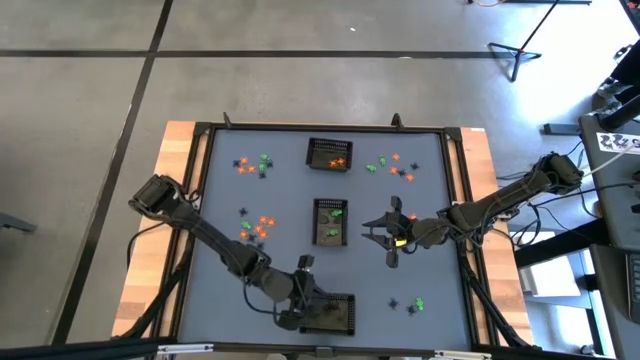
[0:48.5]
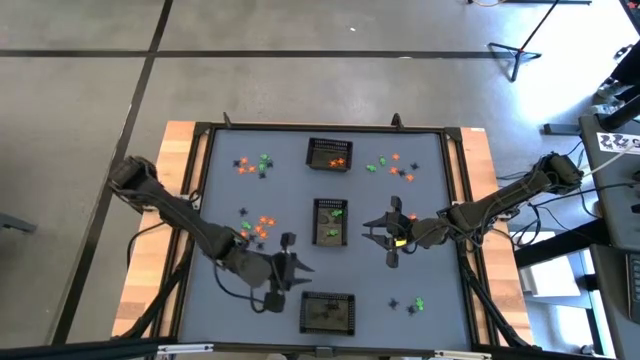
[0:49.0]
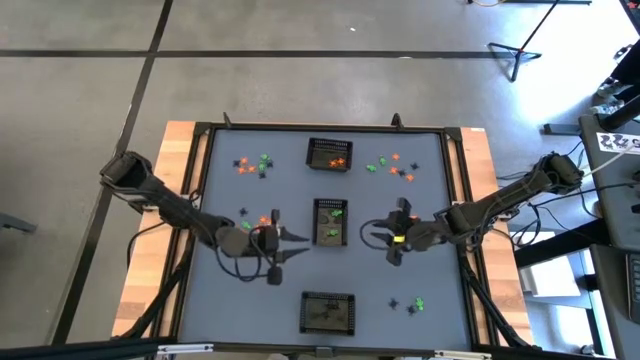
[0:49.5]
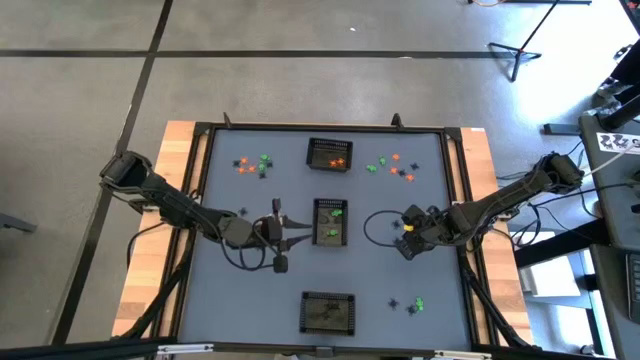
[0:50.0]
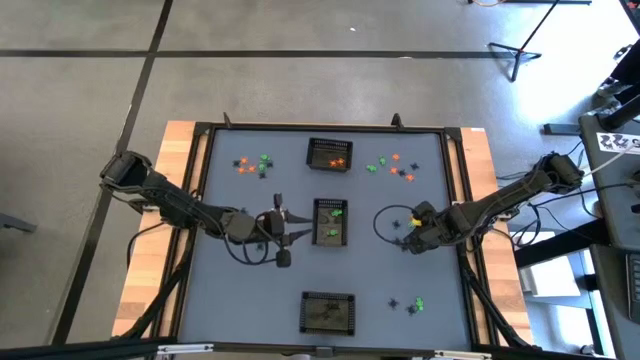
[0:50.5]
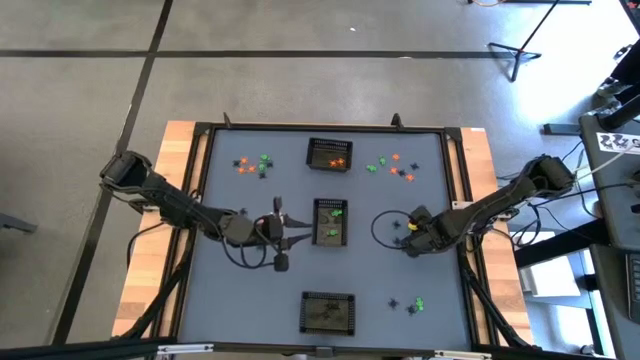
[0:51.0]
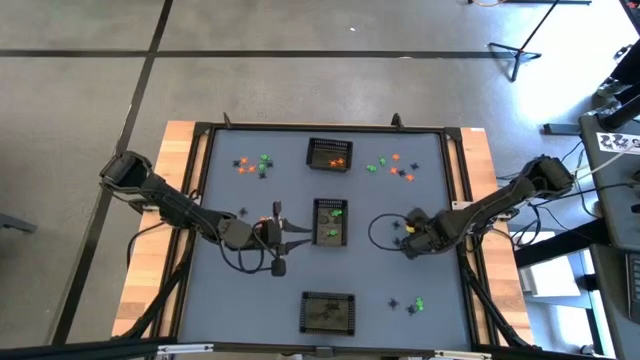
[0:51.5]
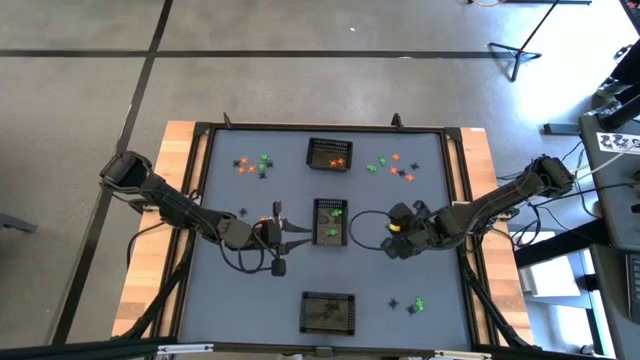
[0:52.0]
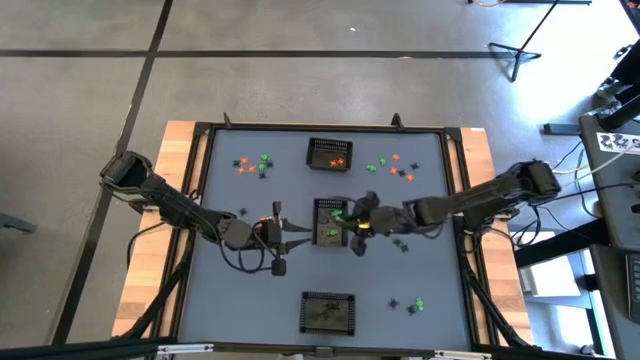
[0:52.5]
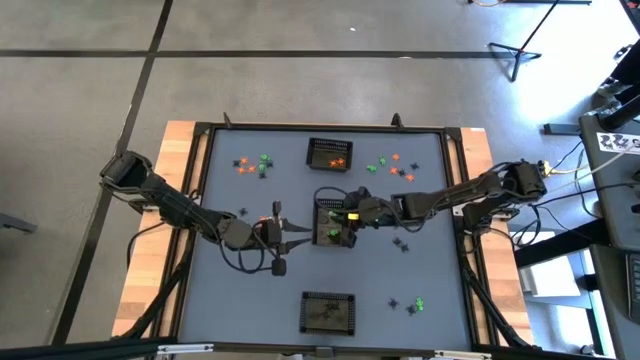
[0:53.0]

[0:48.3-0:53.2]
Task: Sort Halloween decoration
Put the green skeleton toy into the center black bin

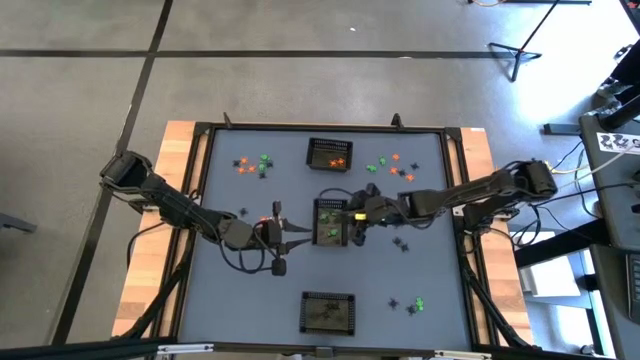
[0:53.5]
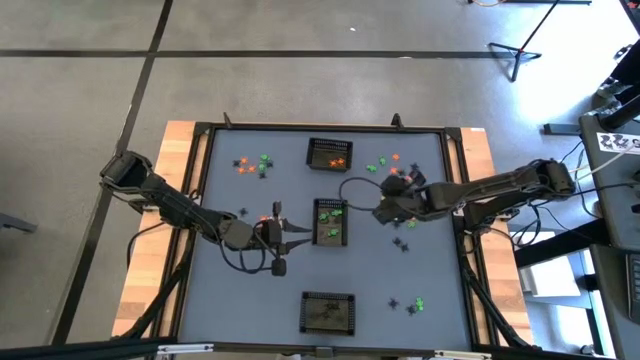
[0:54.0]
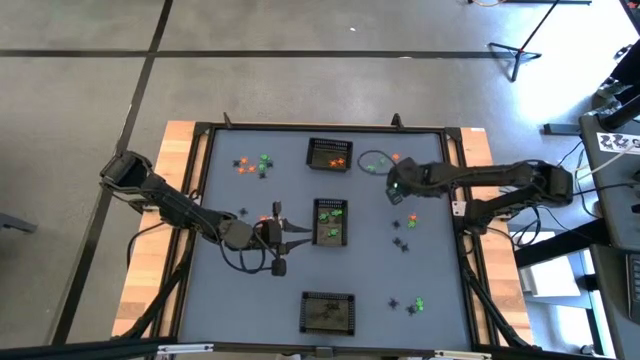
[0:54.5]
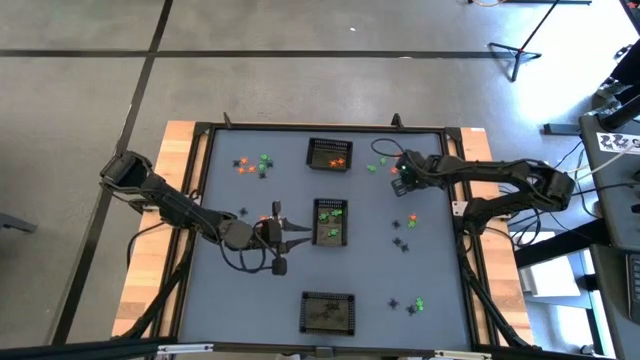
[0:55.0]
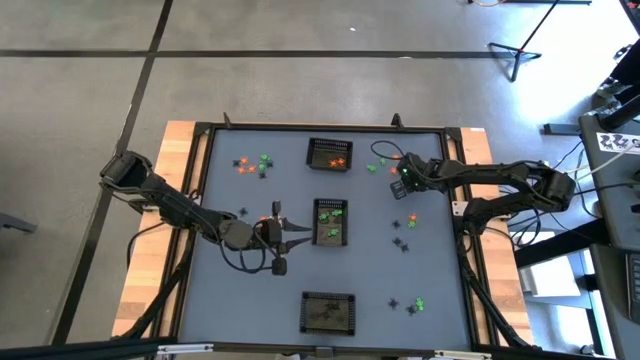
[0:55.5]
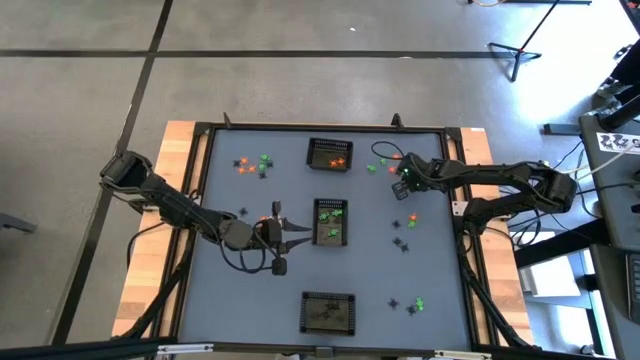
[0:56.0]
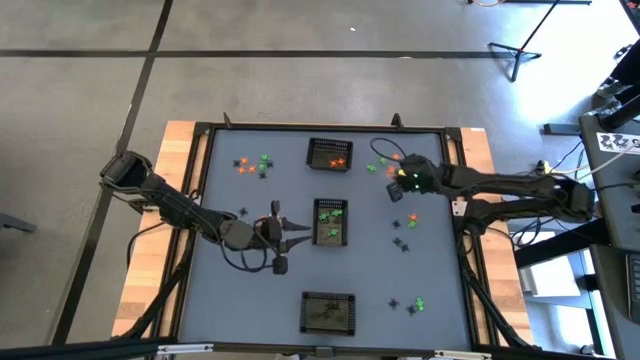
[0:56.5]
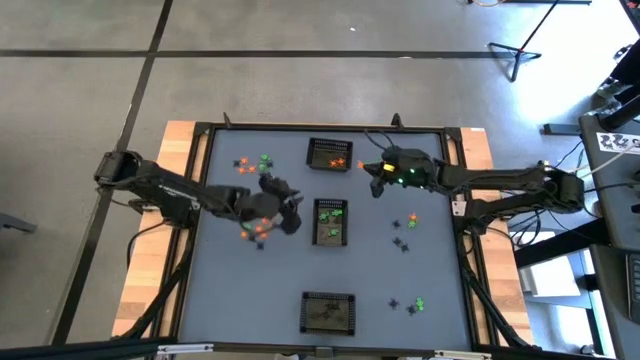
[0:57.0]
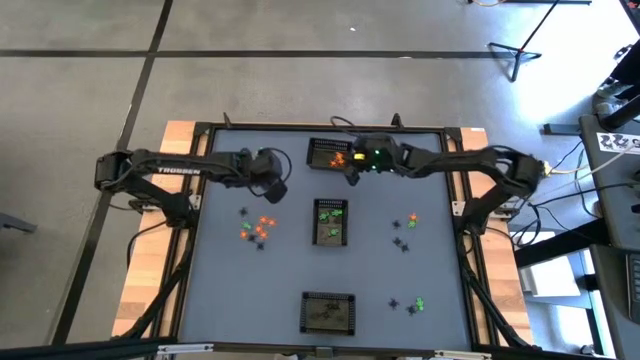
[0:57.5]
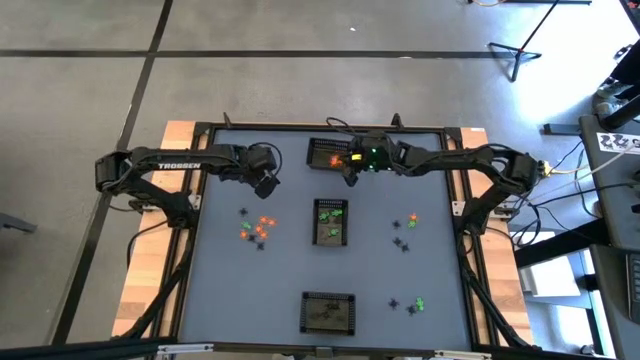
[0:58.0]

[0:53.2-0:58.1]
Put the orange spider toy into the top black bin

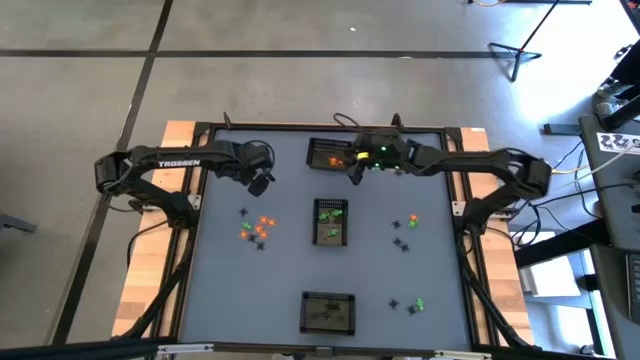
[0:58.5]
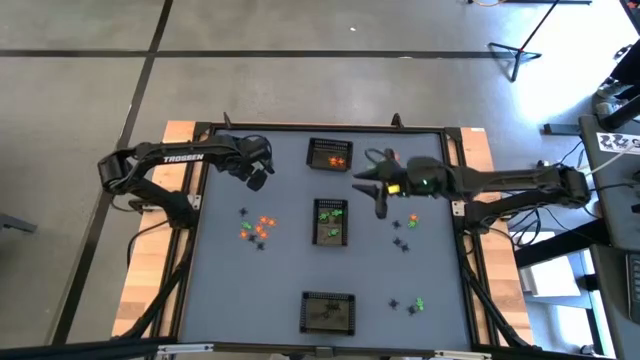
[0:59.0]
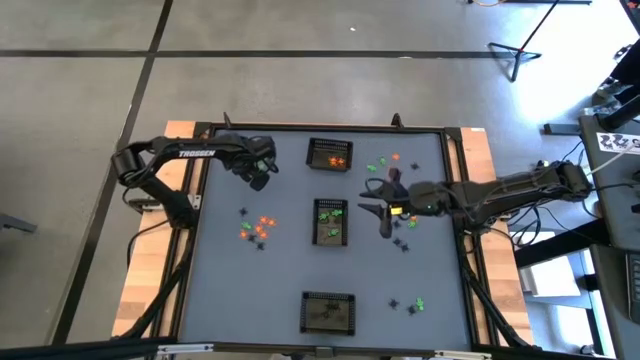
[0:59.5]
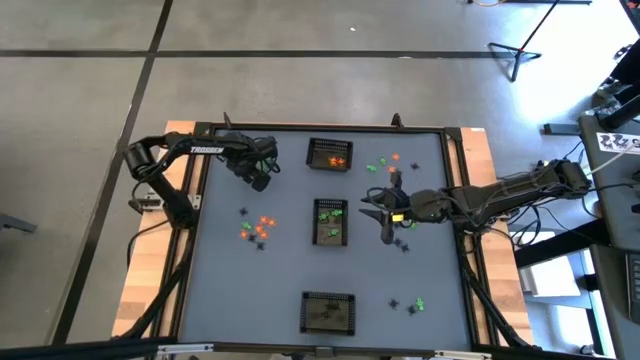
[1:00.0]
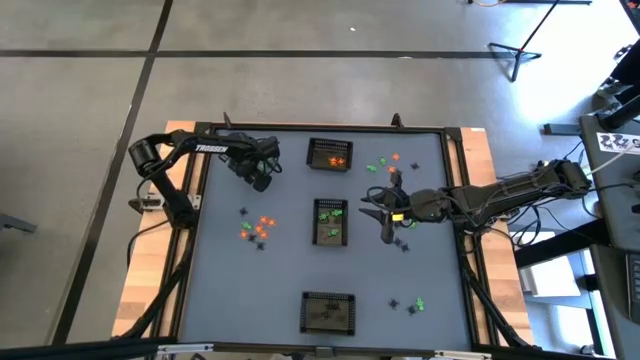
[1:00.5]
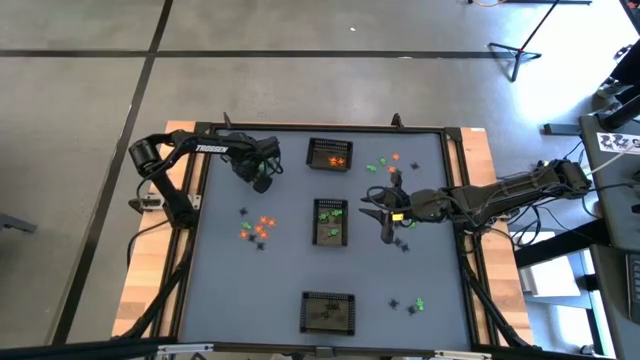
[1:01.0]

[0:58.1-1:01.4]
Put the orange spider toy into the top black bin

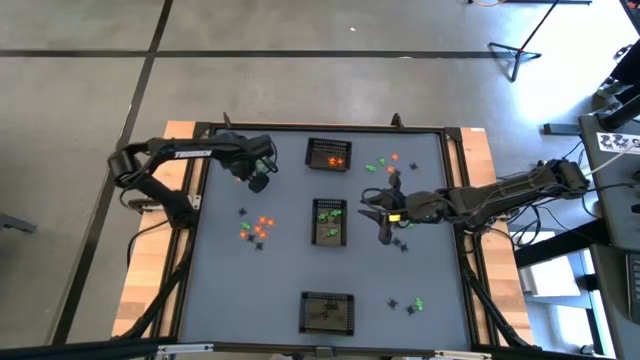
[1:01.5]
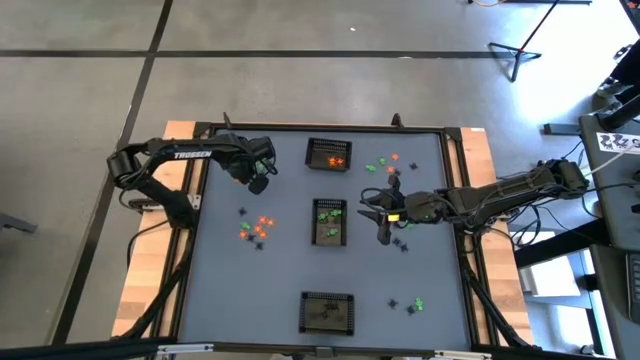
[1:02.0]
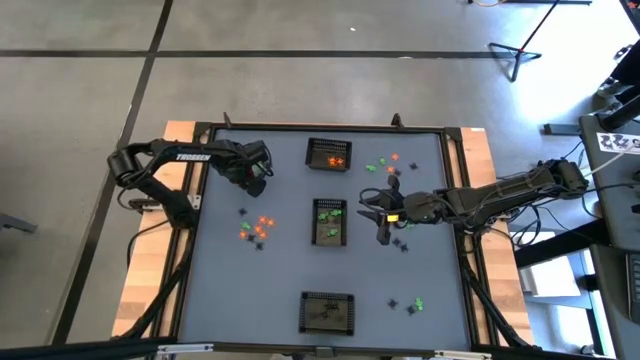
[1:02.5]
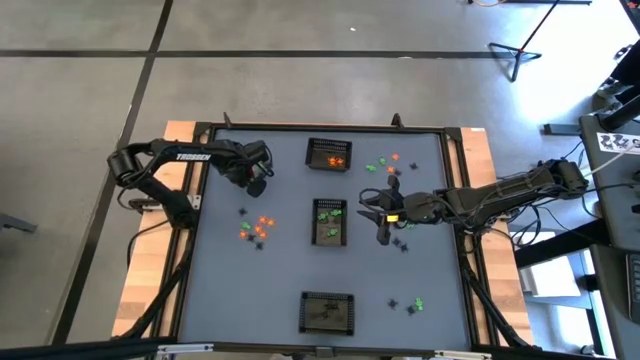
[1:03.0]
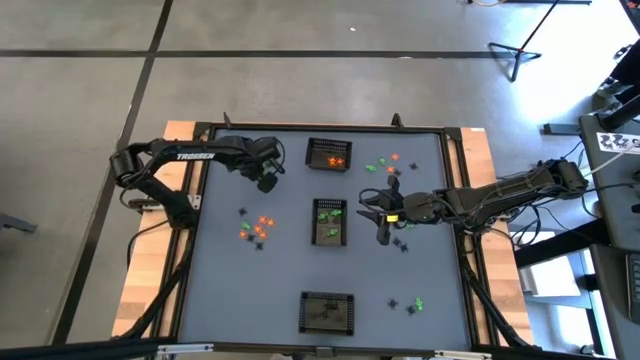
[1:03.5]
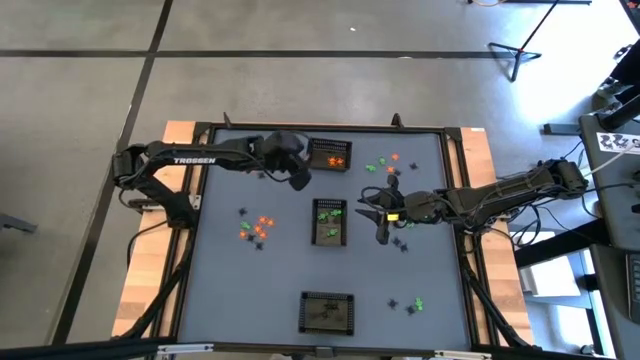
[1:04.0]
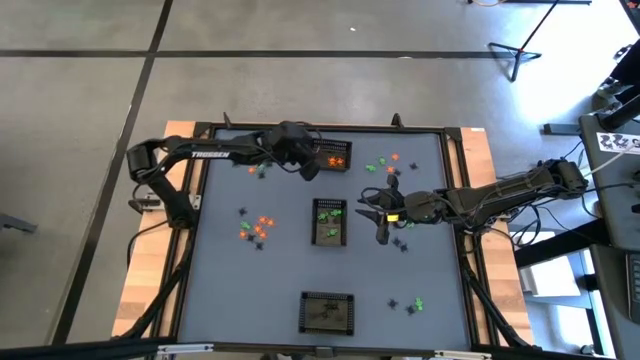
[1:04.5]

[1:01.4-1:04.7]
Put the orange spider toy into the top black bin

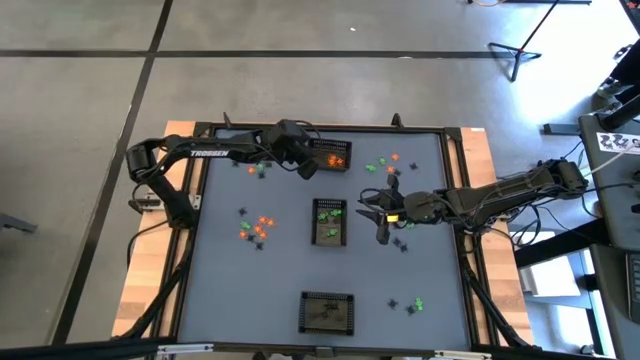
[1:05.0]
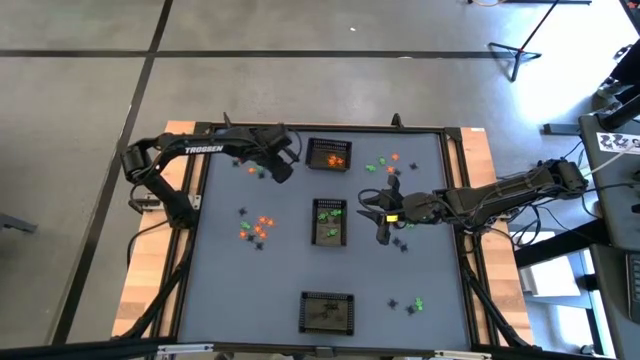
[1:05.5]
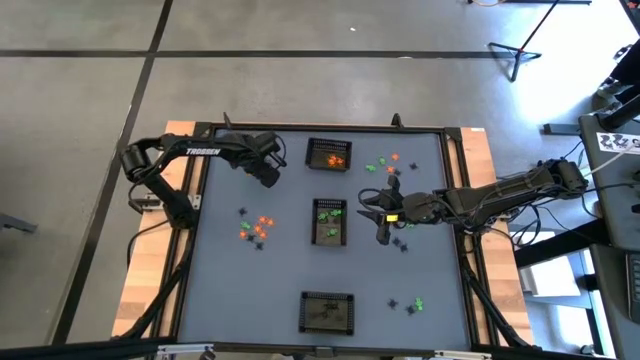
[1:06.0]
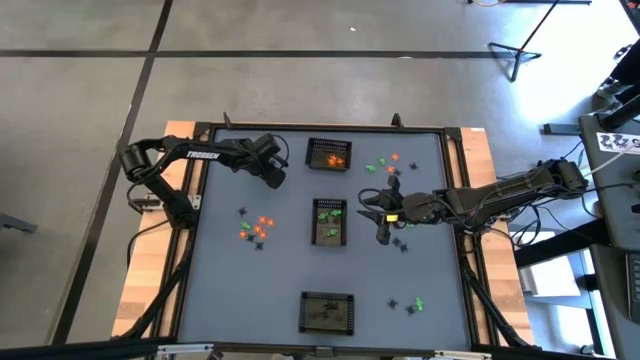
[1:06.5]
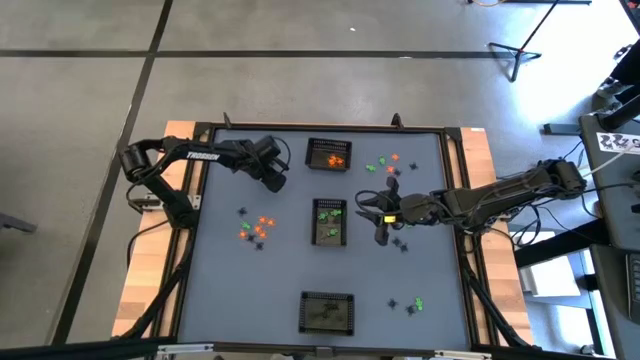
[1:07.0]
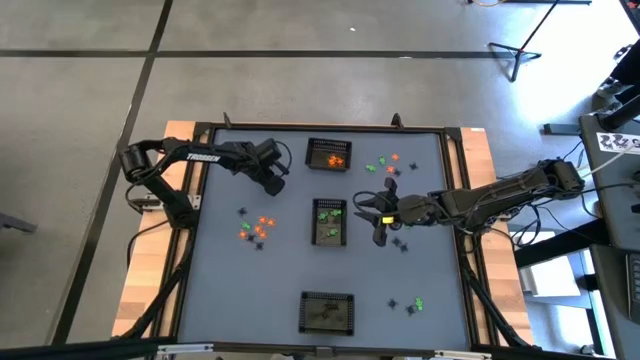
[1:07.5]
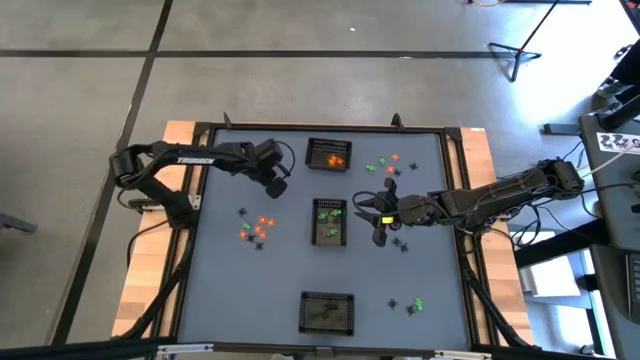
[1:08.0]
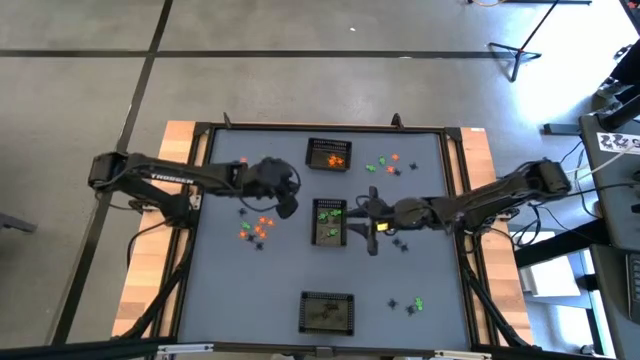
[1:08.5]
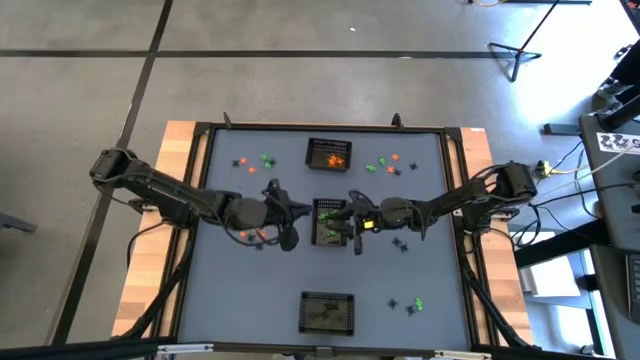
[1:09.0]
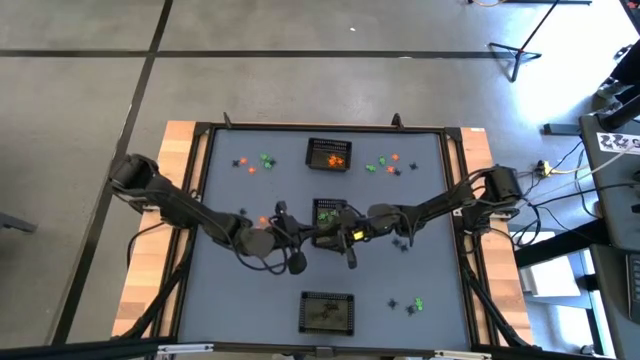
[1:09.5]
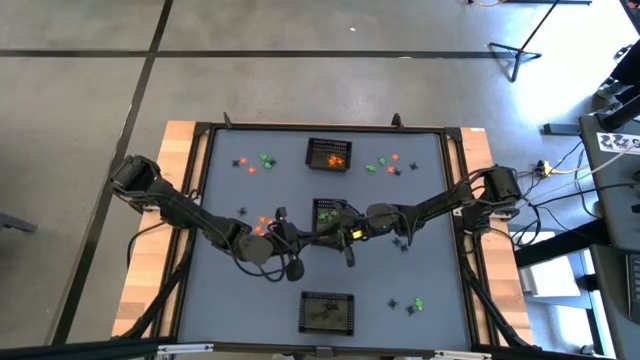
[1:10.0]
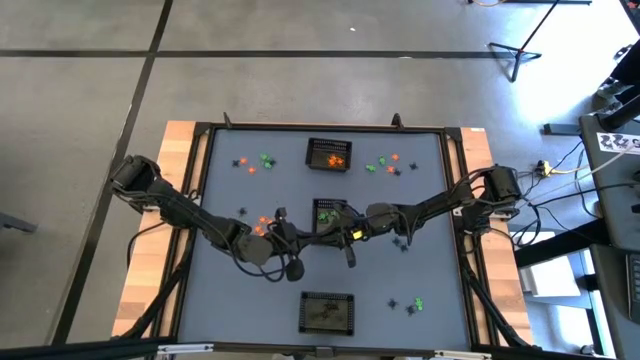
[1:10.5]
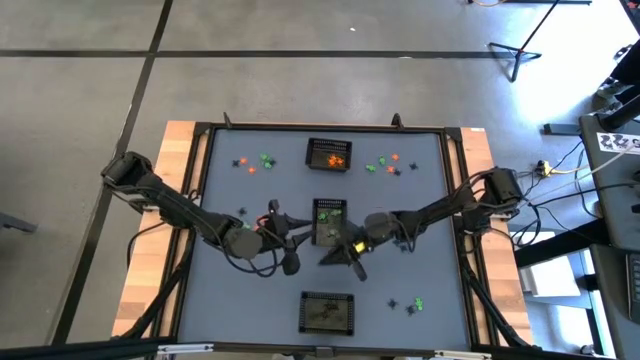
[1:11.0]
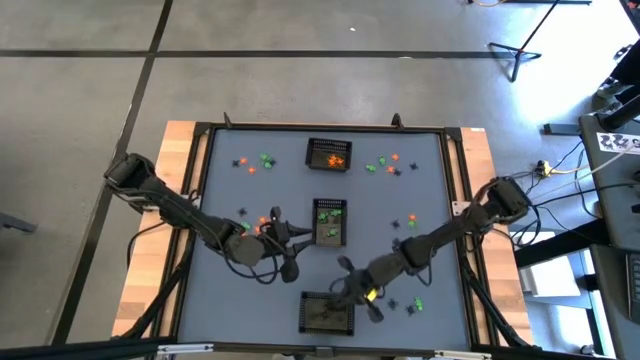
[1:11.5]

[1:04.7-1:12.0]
Put the black spider toy into the bottom black bin
